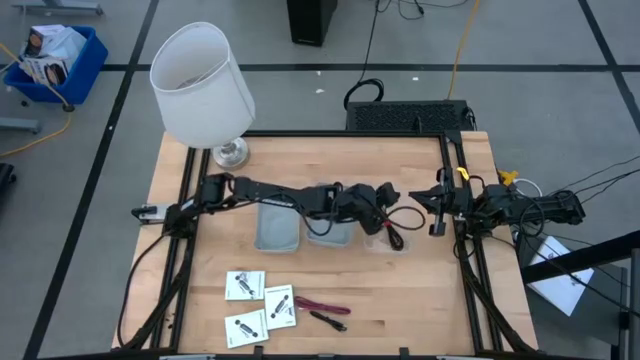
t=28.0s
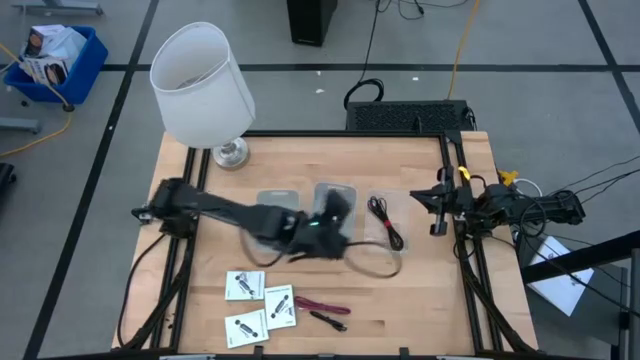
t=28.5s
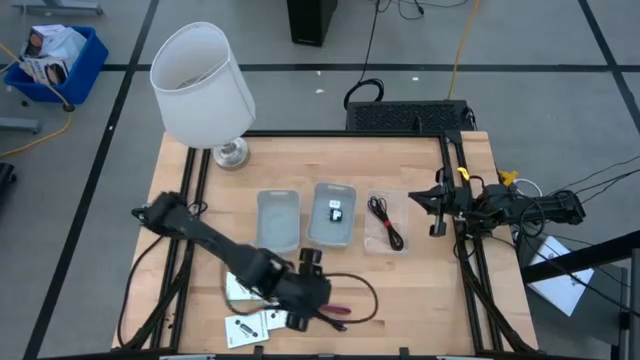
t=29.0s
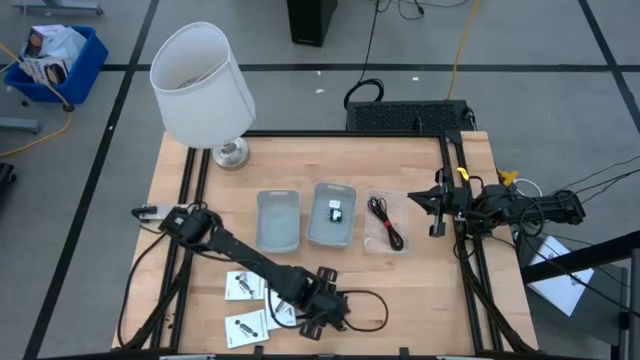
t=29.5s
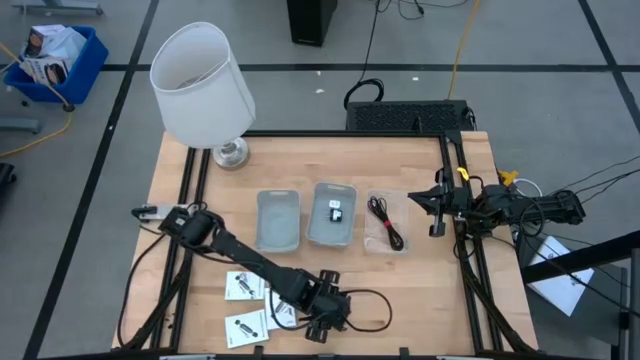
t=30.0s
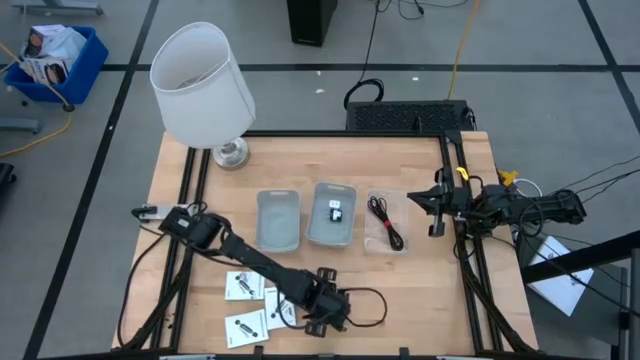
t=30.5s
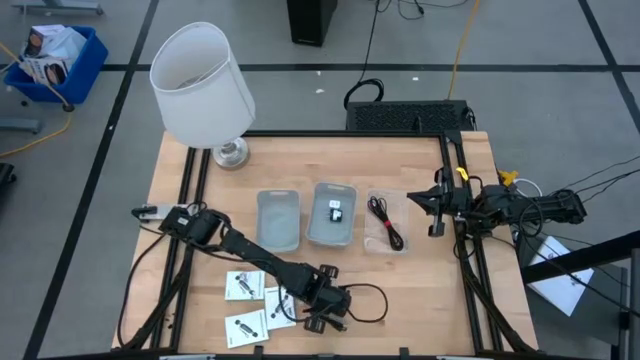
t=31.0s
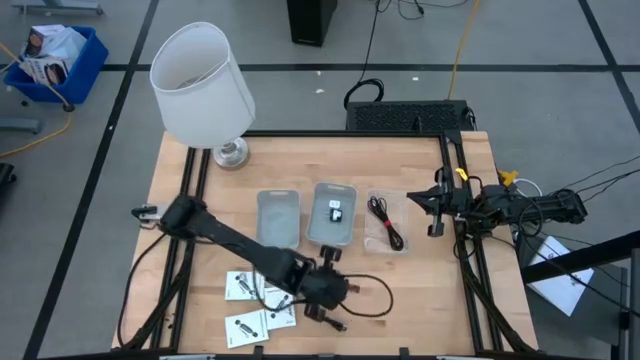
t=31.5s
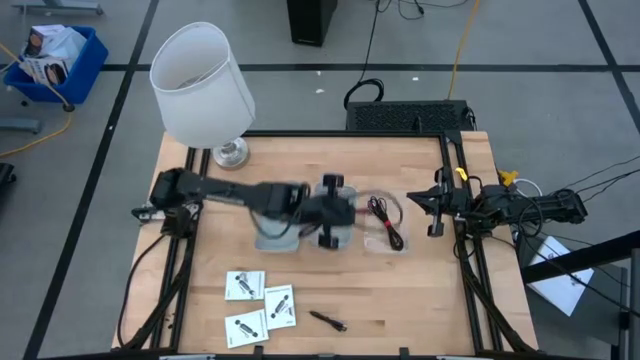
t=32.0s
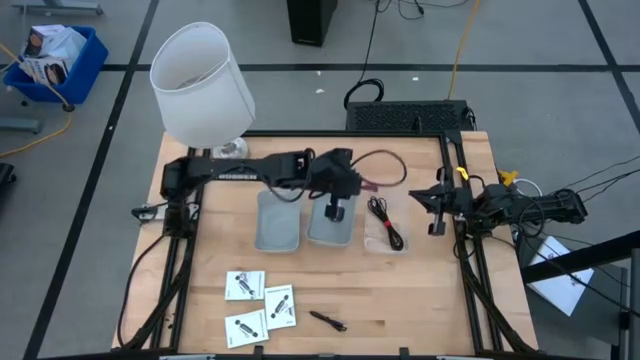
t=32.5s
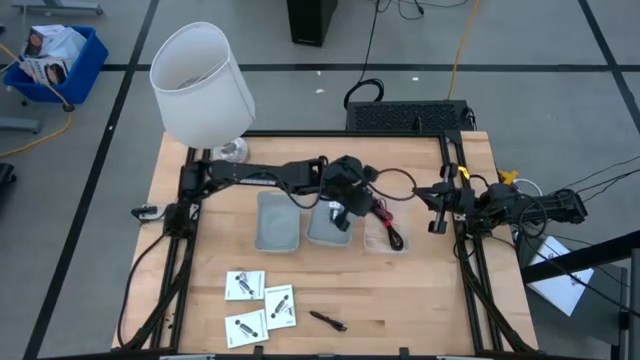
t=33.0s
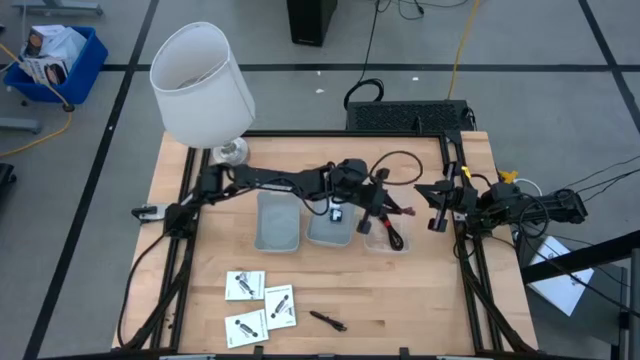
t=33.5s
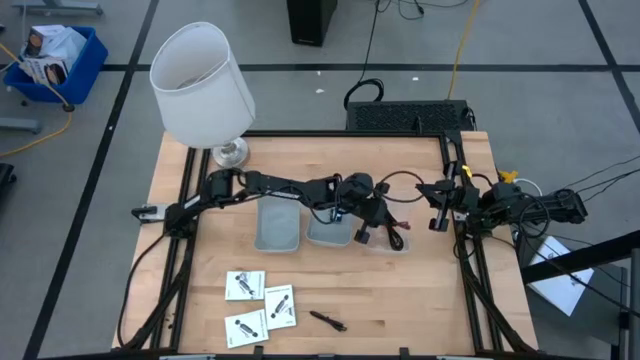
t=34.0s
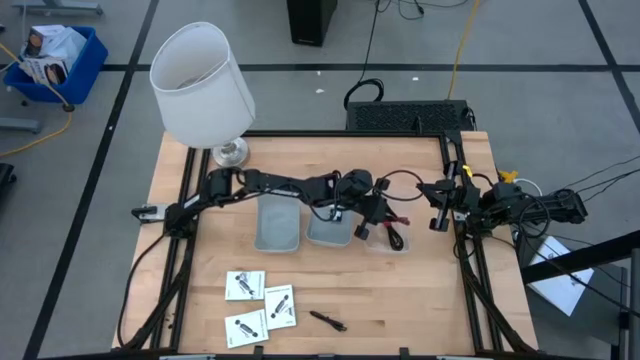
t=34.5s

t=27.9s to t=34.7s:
Task: Pick and place items into bin
Put the pink charger cable into the transparent bin

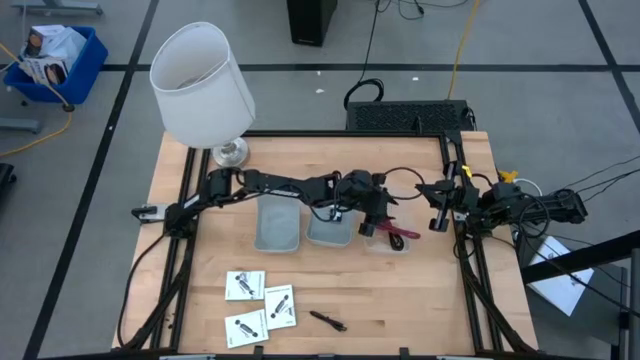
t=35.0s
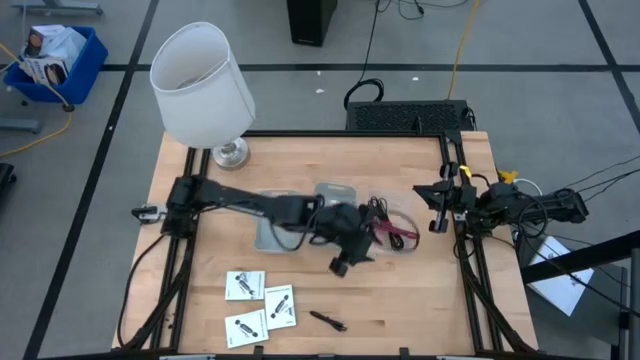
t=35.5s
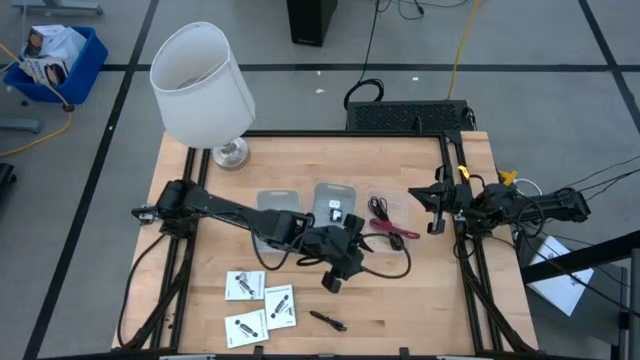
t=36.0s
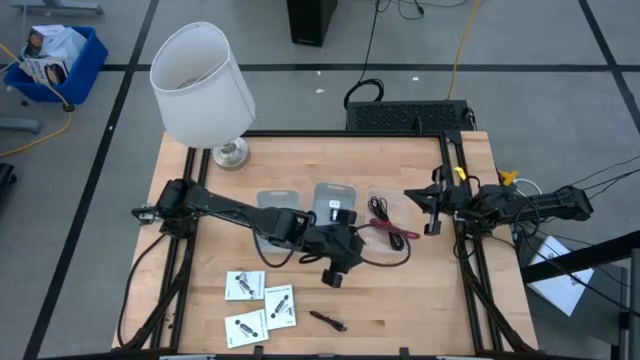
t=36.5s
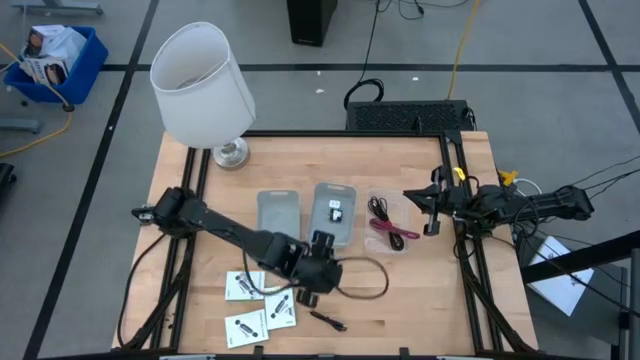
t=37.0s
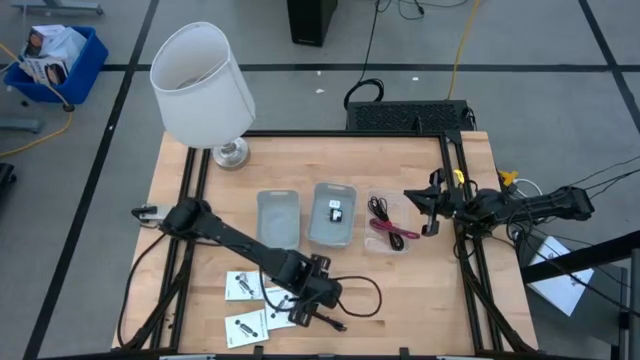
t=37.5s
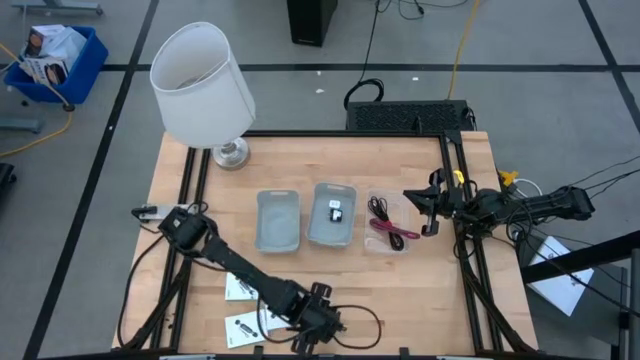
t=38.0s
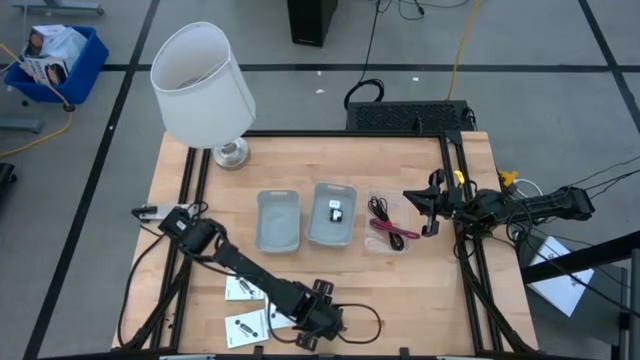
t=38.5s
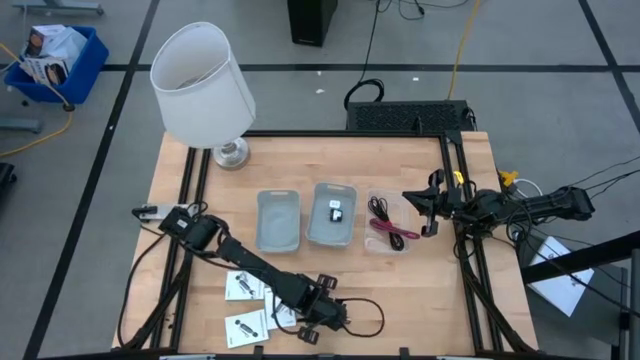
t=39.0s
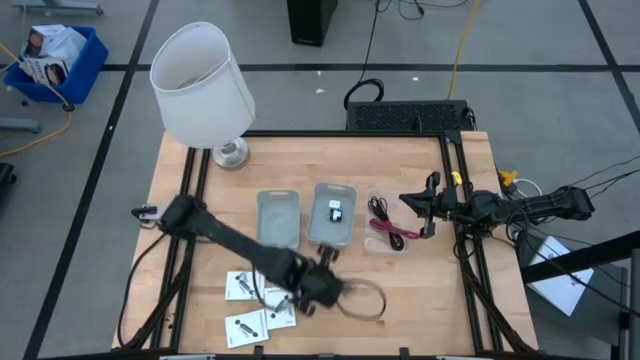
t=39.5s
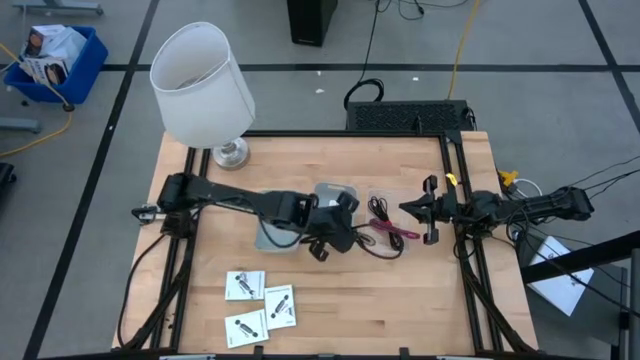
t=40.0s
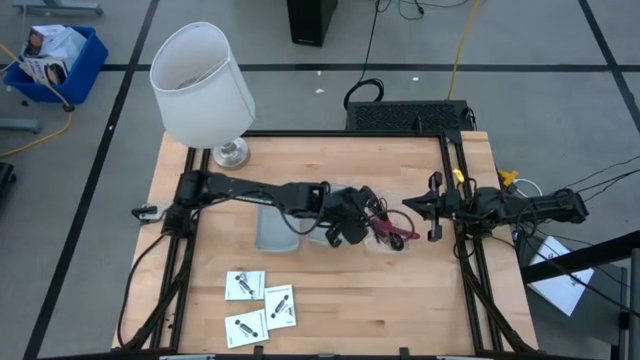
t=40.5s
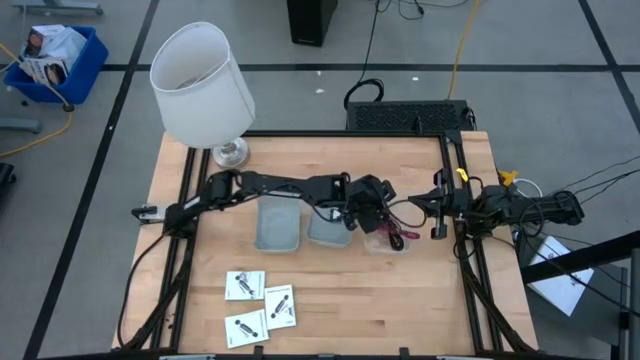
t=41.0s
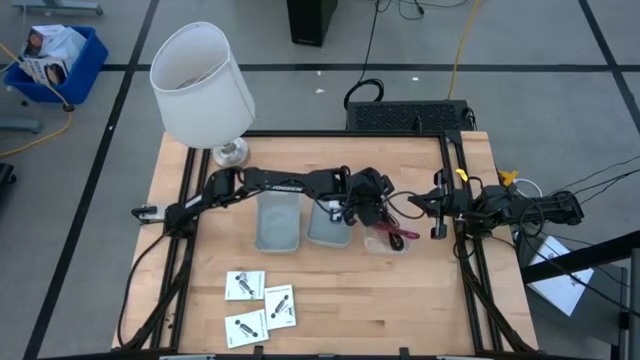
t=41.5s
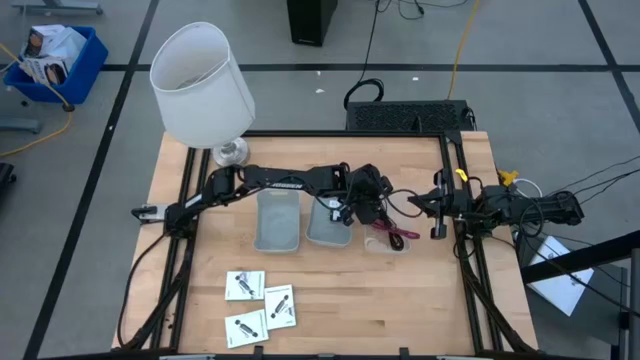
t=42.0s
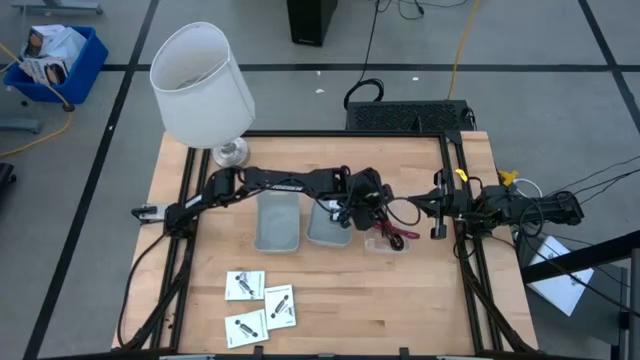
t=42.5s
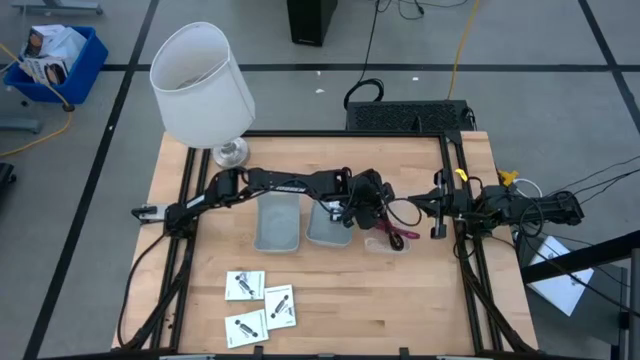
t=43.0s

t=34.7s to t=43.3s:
Put the black charger cable into the transparent bin

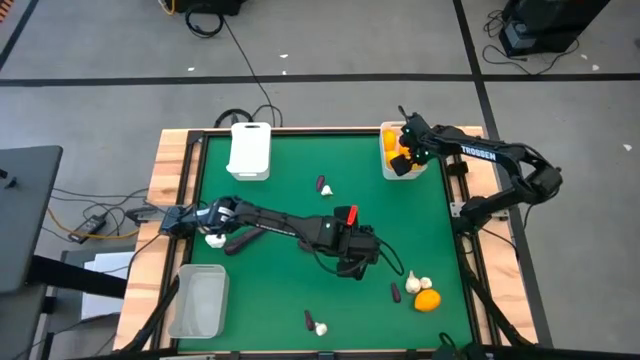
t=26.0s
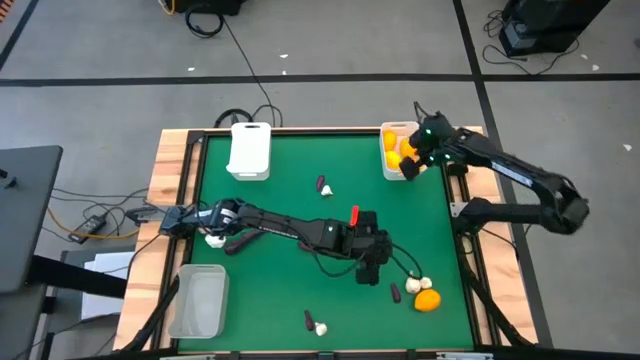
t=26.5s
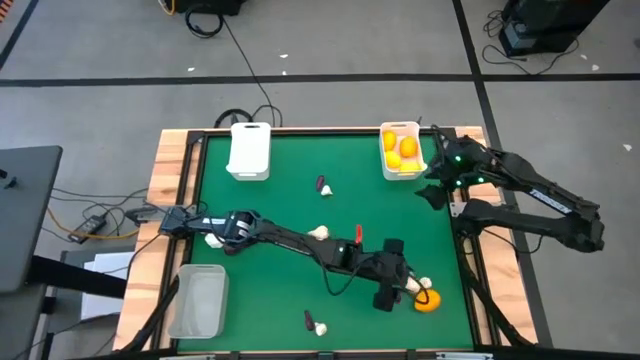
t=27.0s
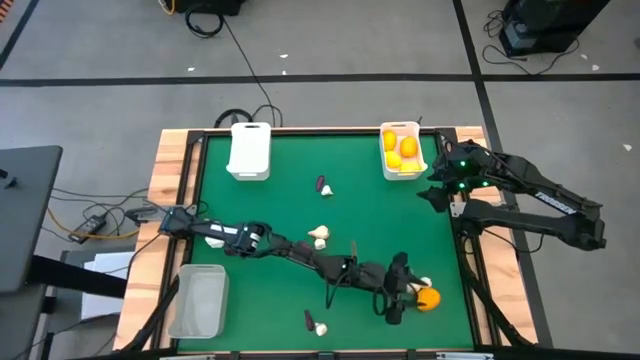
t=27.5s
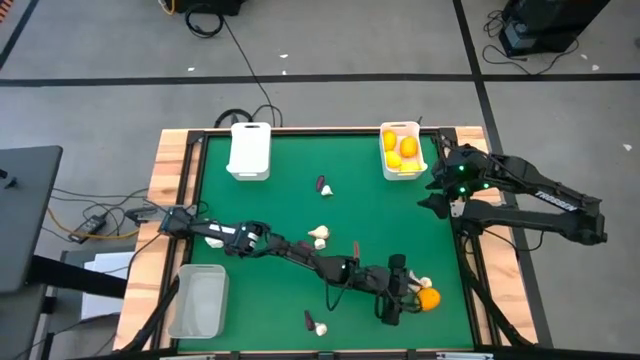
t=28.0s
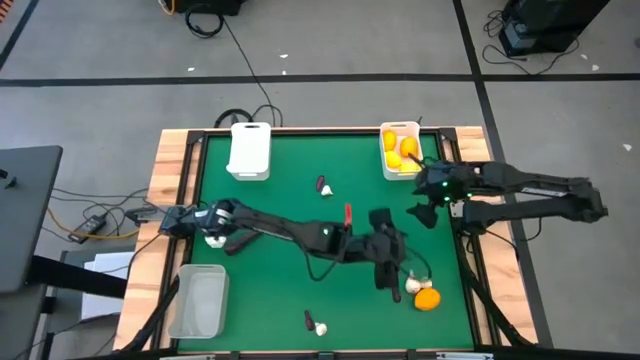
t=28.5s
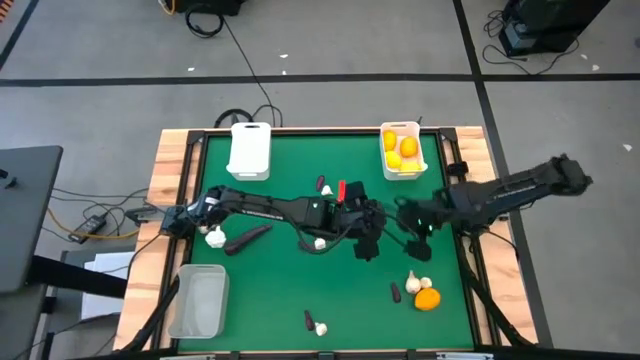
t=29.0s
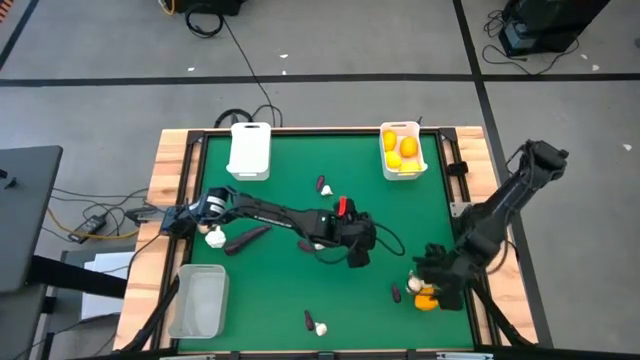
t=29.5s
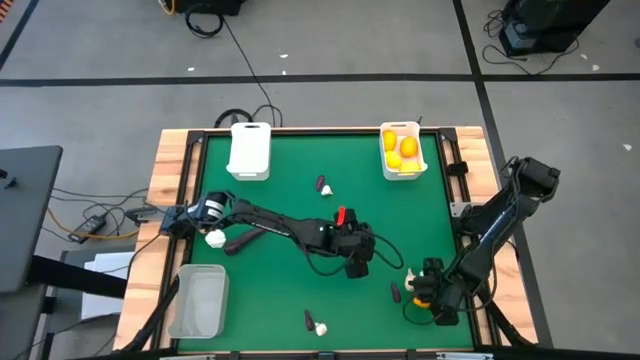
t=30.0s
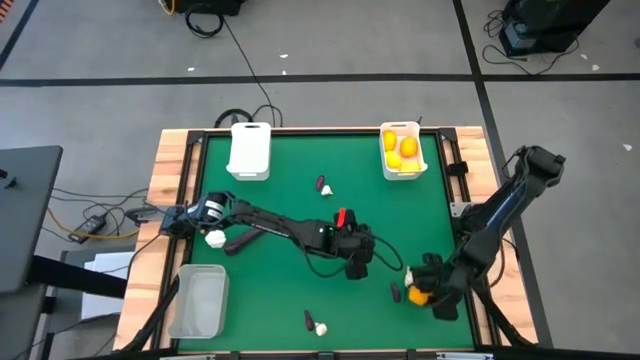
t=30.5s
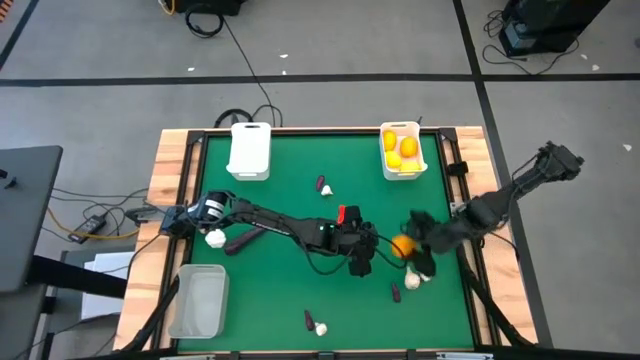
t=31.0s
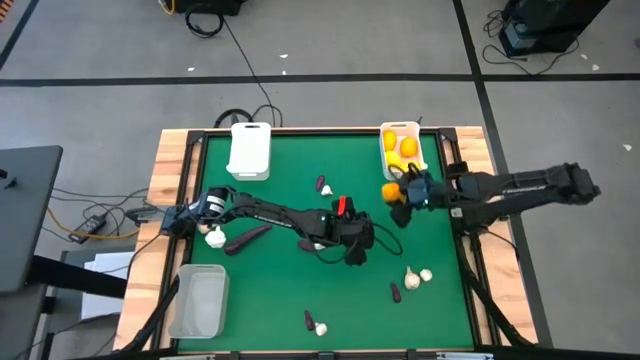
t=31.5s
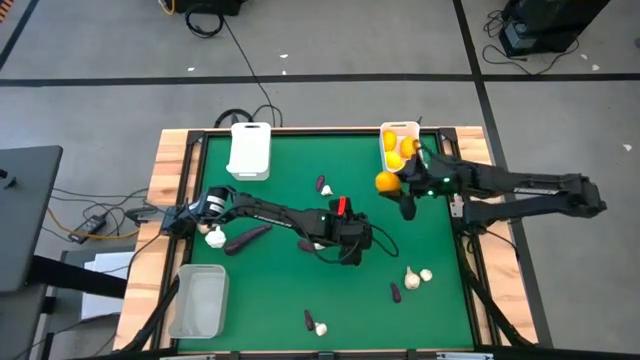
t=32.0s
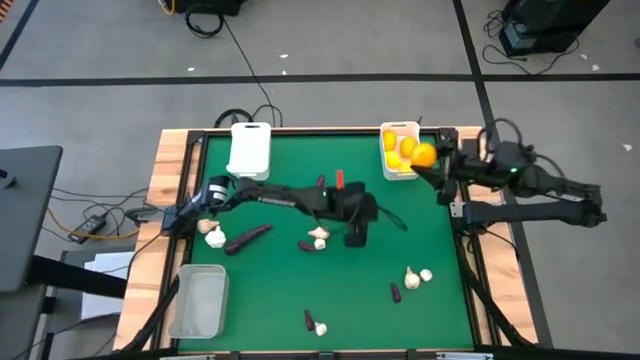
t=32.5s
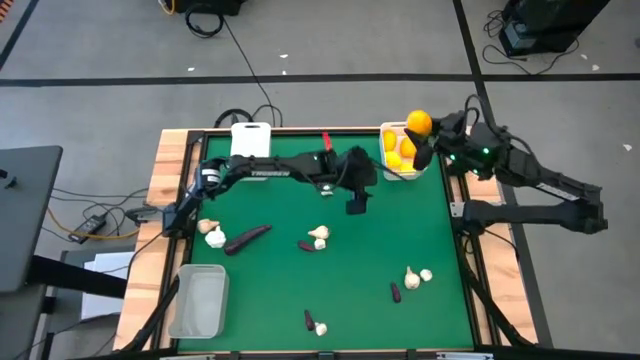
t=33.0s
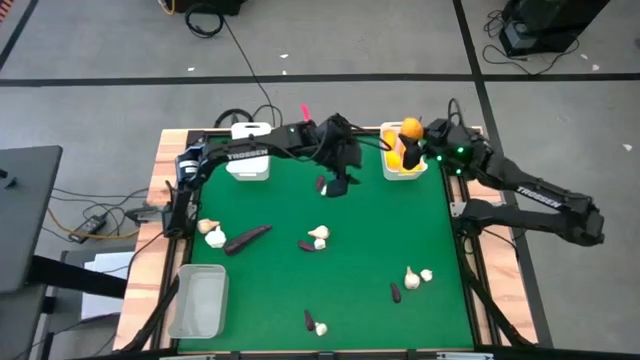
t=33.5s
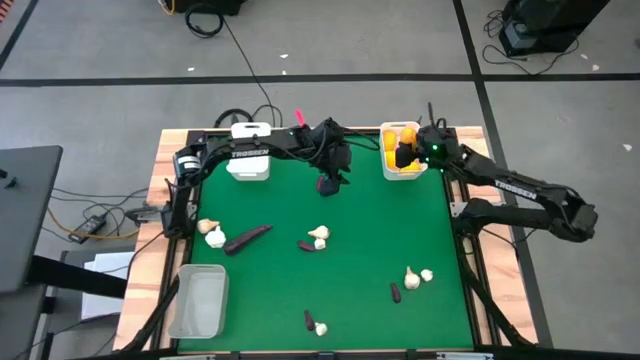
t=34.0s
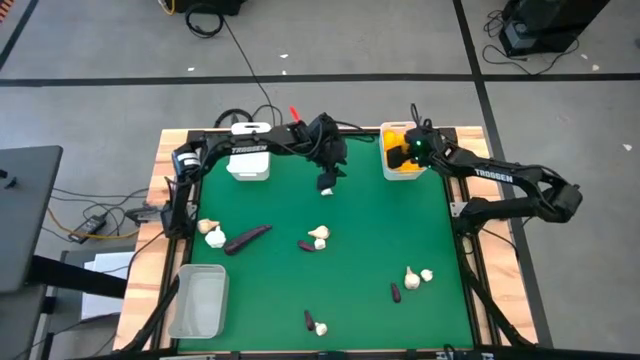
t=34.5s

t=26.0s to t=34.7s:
Task: Sort produce into baskets
Put the lemon into the right white bin
